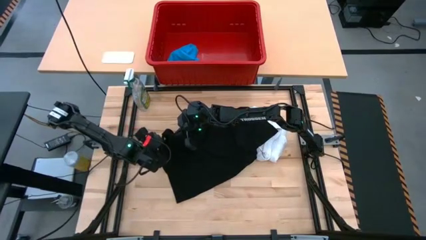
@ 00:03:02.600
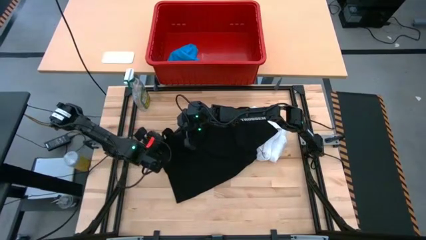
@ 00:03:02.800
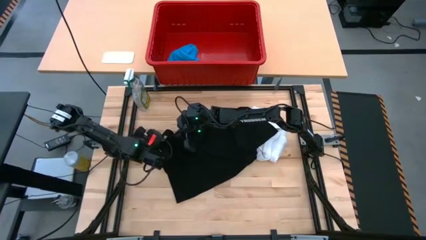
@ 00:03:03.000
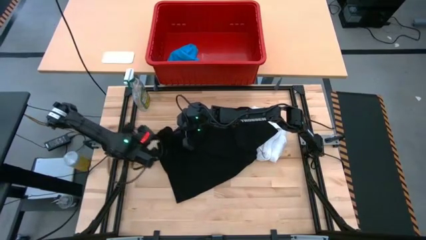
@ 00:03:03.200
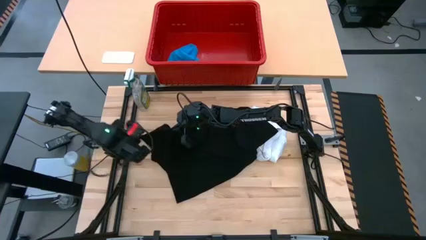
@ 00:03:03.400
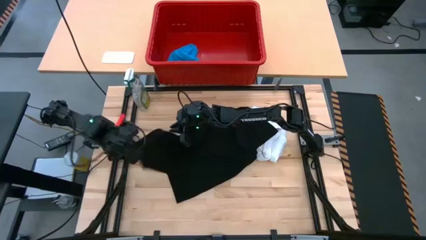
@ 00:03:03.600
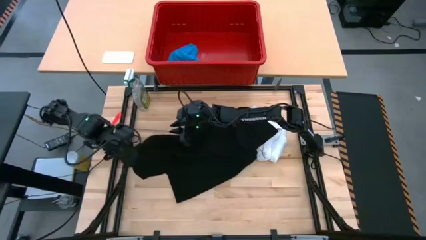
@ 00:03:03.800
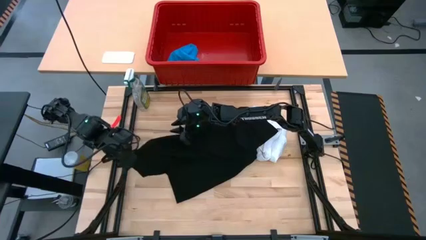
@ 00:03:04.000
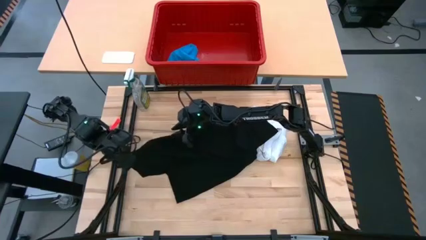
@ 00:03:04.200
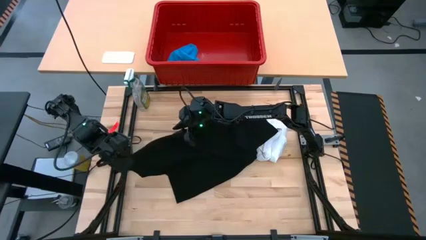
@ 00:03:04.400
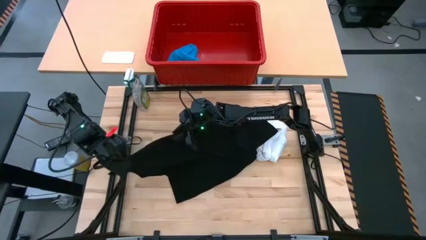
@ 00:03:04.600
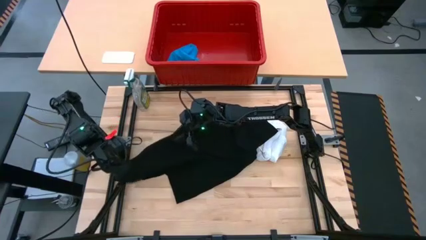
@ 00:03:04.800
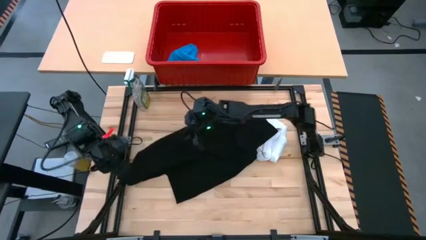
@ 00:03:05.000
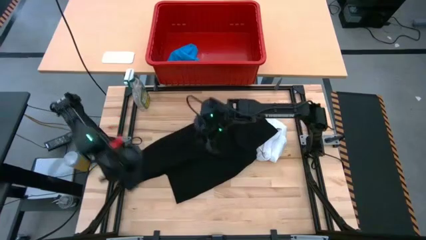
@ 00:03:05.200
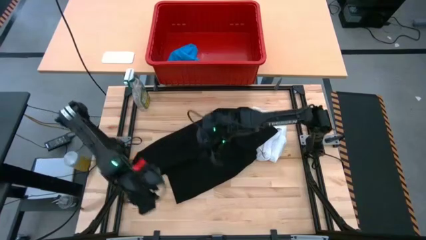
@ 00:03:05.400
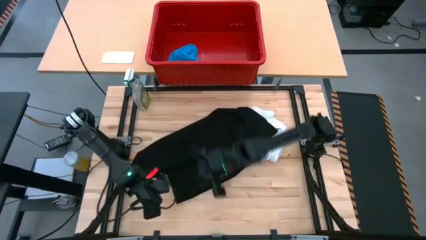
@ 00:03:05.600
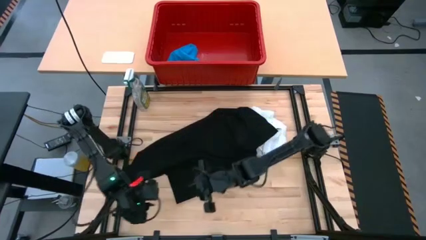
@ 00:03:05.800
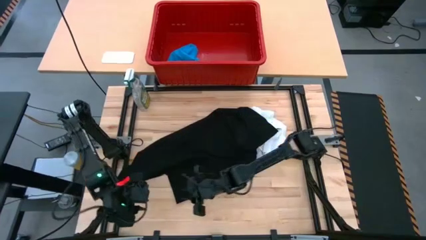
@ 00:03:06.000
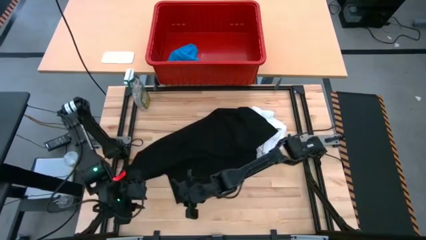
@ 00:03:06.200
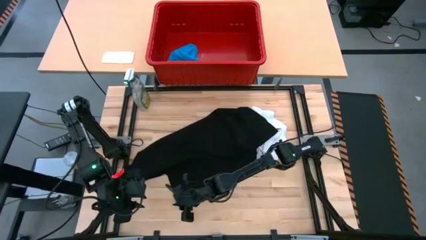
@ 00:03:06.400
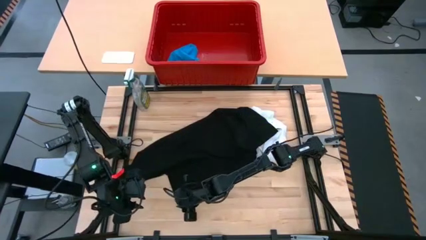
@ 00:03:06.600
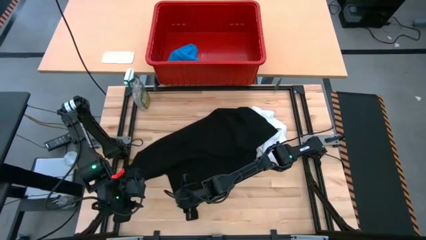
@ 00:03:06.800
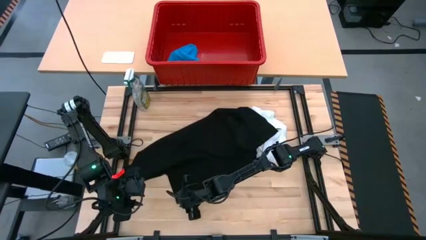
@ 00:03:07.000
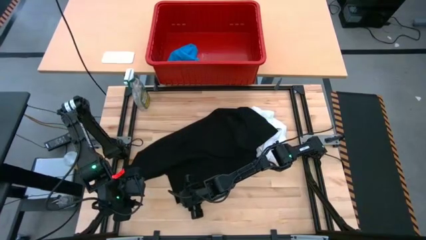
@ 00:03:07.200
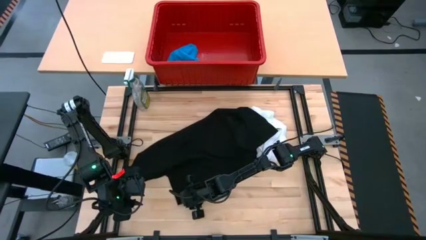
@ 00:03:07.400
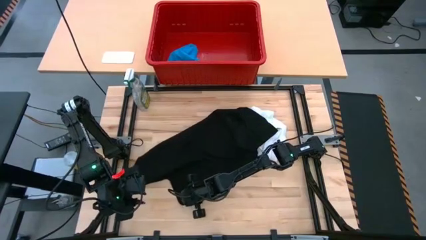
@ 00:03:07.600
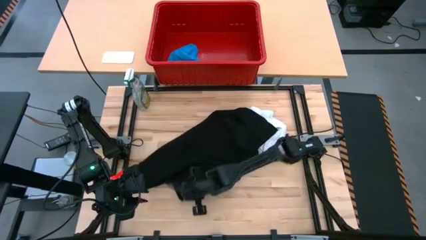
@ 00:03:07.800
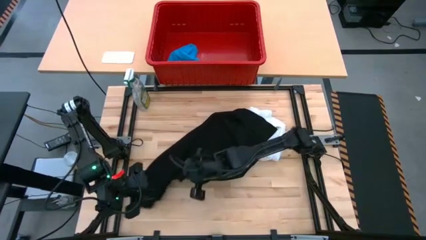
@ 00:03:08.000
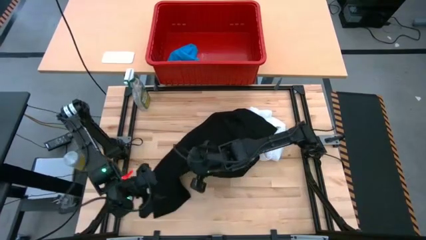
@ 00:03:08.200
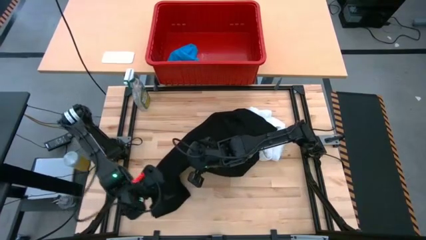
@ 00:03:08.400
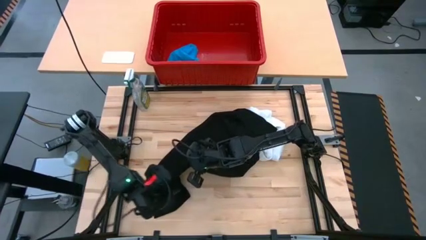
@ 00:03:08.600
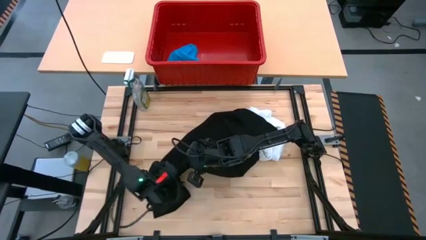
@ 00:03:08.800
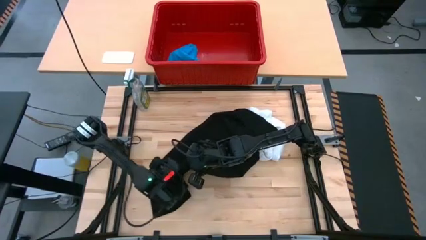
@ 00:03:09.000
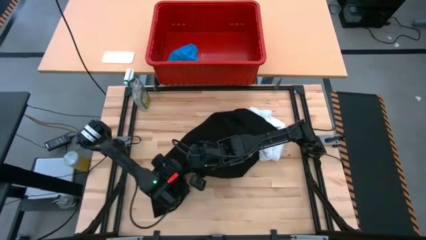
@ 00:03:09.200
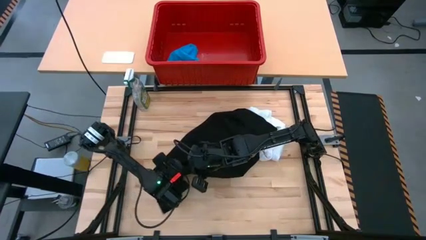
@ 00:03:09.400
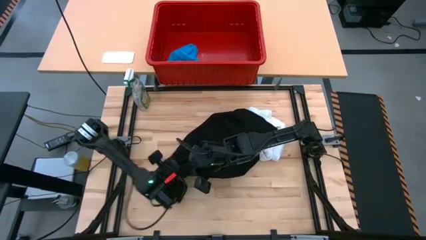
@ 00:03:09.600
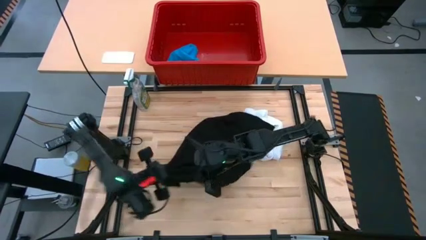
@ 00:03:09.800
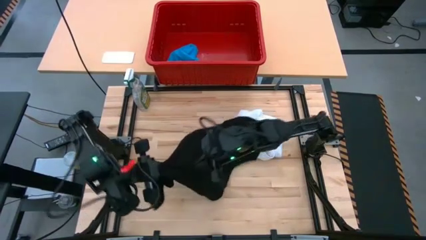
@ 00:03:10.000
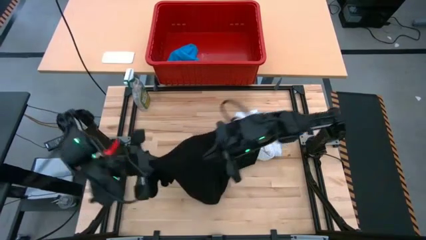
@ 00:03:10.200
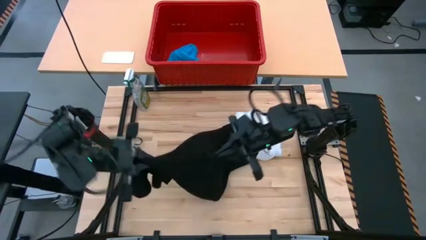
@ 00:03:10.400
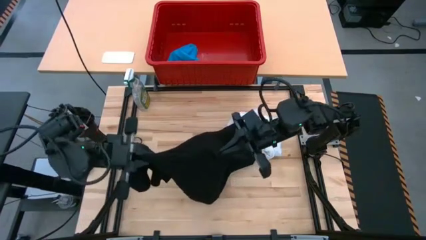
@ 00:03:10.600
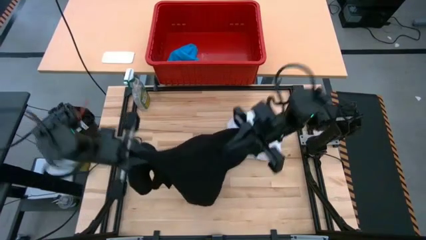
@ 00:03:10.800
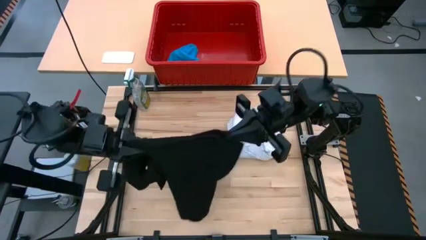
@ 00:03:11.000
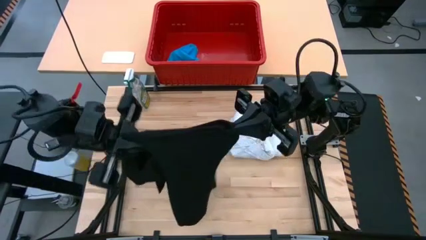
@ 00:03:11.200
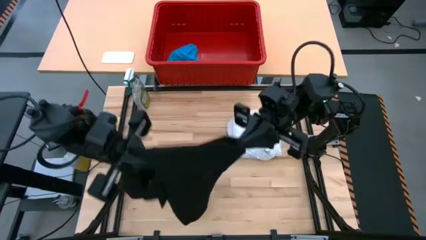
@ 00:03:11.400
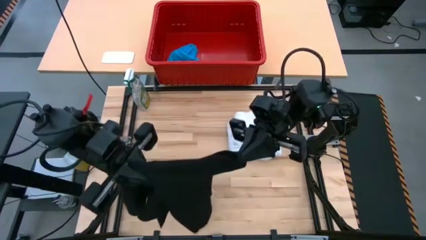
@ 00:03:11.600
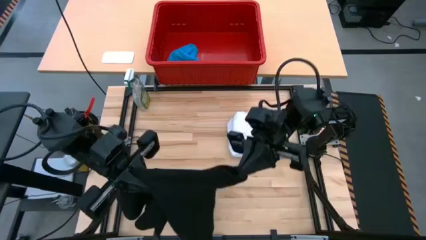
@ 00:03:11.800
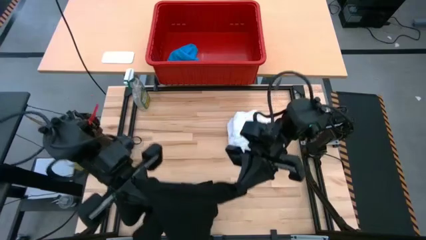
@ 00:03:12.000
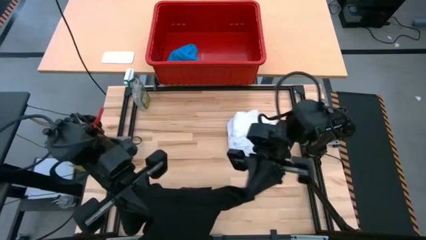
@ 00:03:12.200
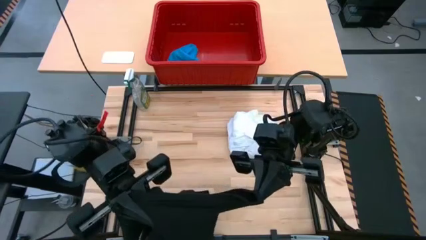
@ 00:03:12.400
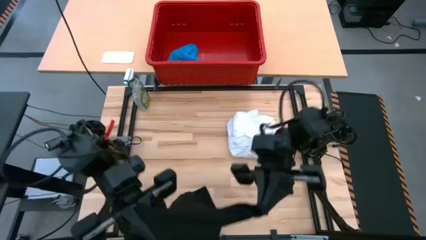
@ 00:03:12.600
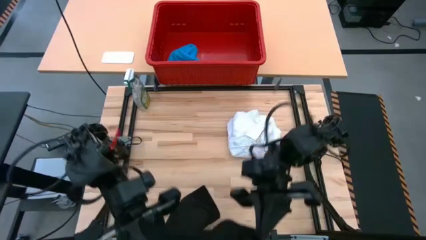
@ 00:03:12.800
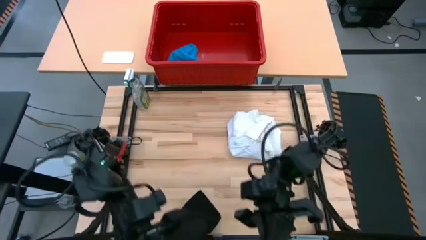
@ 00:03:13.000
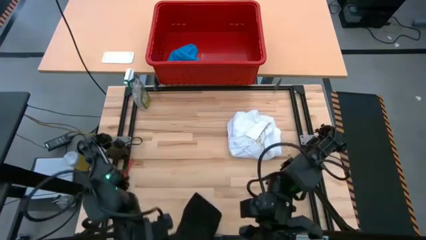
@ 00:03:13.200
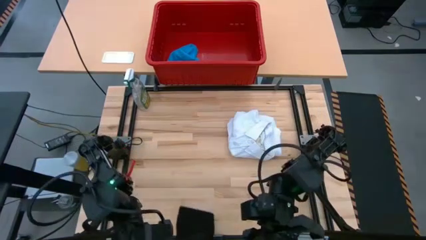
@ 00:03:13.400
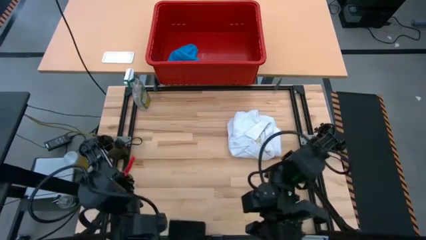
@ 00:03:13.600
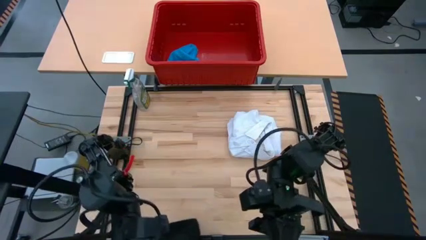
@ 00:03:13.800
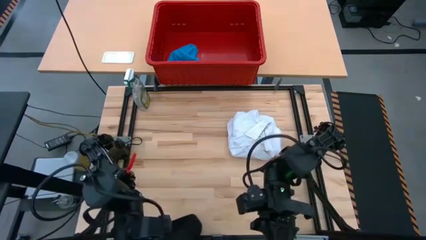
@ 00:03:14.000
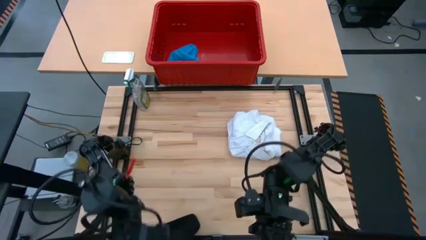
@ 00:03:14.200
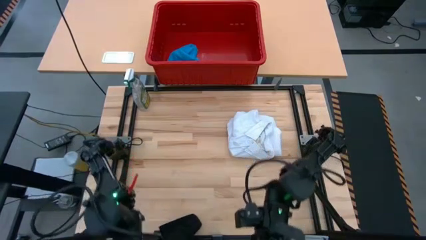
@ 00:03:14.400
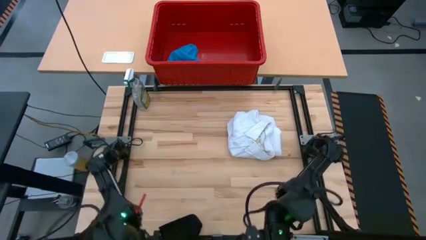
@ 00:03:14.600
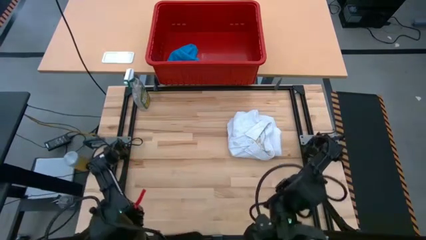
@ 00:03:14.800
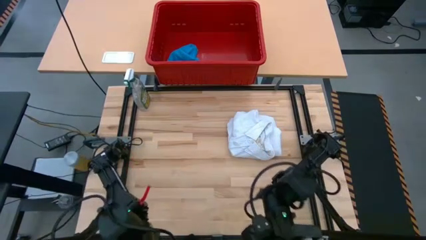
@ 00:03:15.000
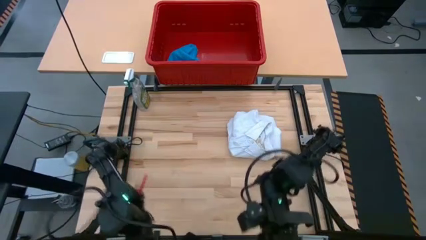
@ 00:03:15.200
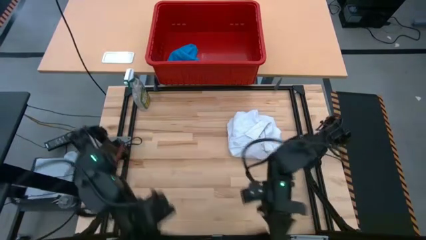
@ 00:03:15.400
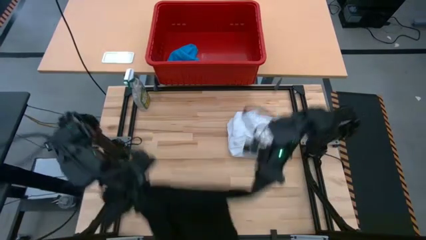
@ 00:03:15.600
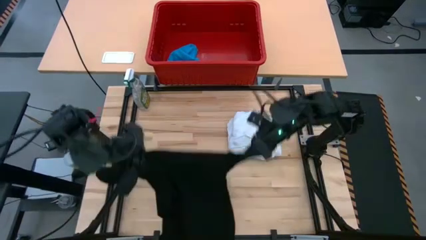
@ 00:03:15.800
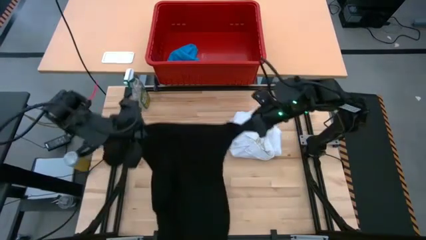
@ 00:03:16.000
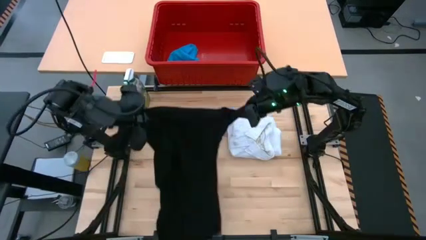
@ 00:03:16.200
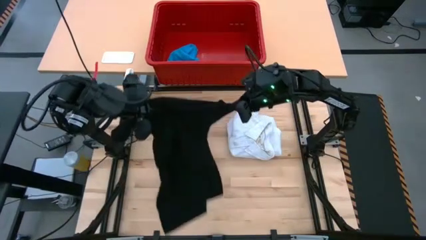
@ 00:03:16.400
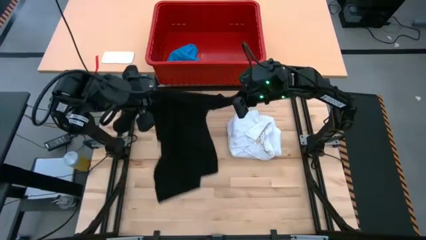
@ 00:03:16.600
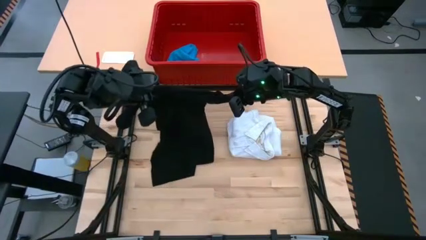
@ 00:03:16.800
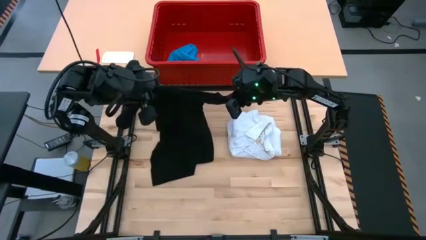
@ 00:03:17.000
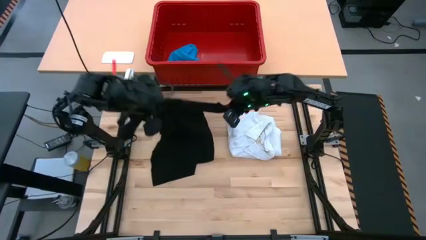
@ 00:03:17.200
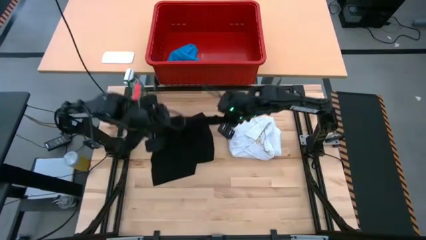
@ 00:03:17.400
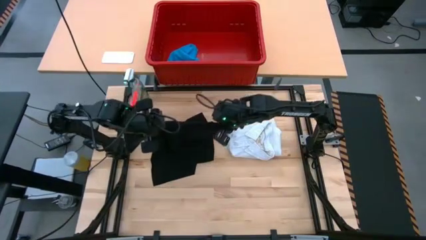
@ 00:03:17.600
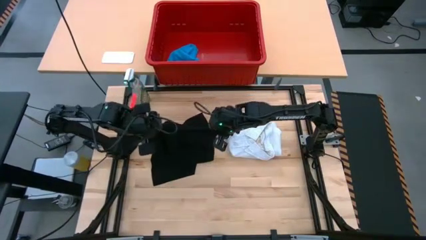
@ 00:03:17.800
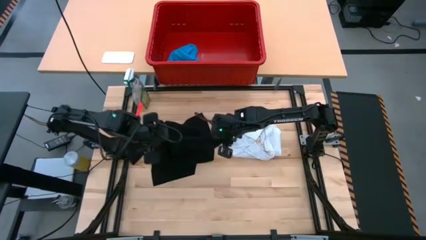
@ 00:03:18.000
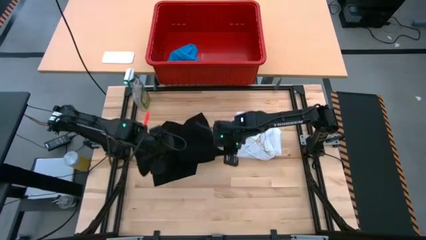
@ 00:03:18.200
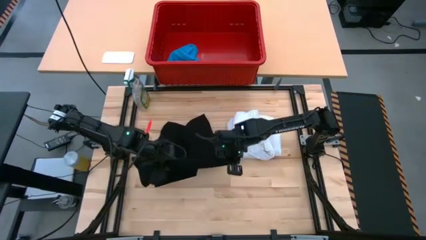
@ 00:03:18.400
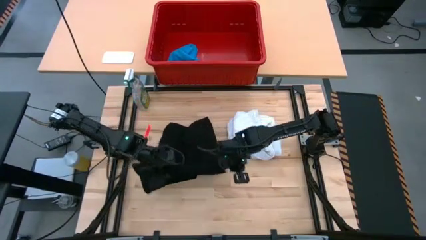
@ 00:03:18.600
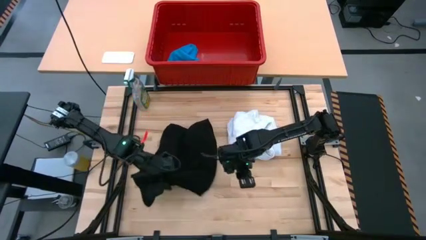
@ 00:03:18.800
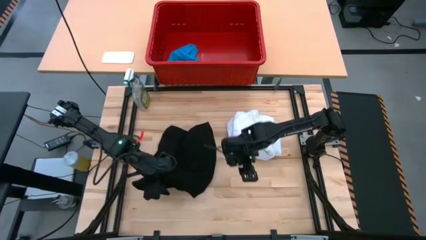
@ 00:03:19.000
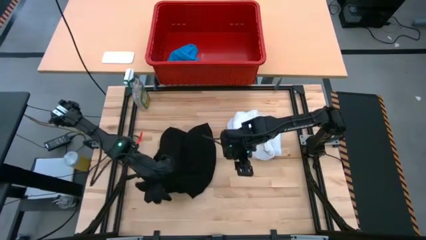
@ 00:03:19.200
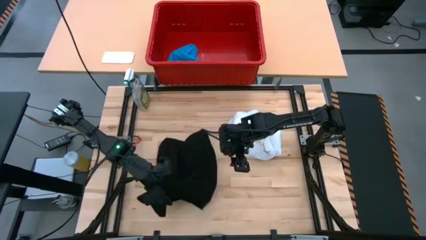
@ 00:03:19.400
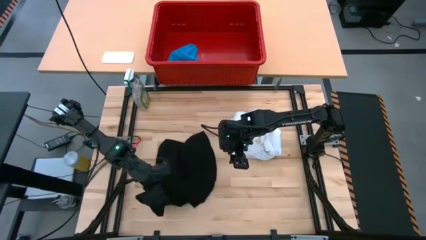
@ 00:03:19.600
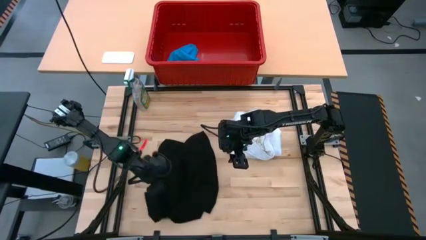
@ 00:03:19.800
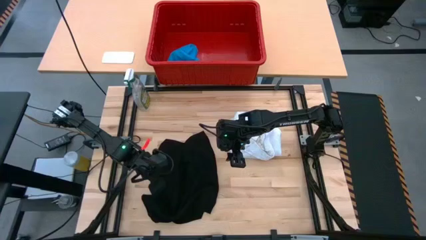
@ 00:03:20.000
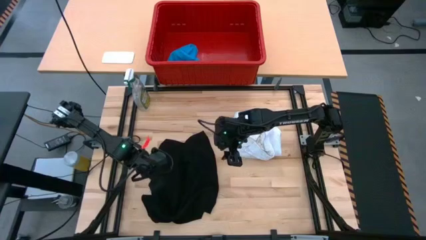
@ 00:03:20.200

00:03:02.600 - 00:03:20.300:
Task: Fold laundry
Fold the black shirt
